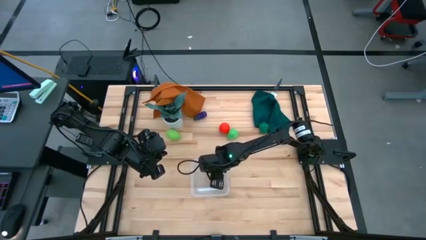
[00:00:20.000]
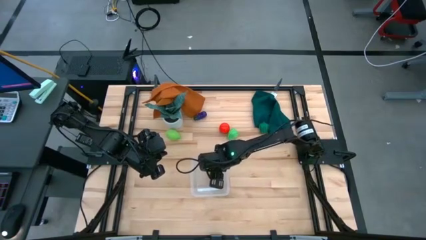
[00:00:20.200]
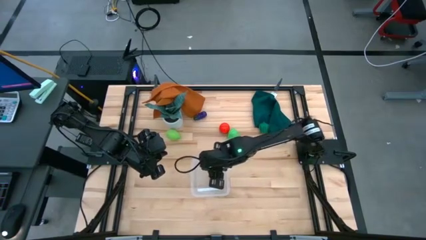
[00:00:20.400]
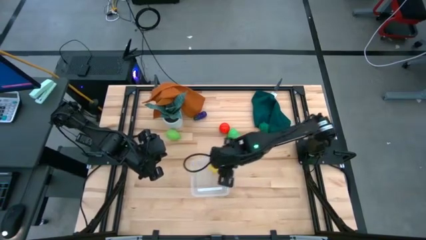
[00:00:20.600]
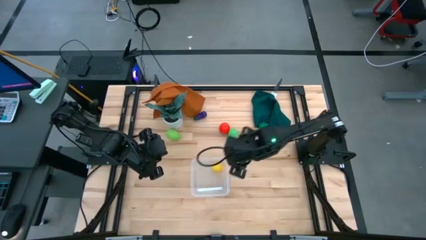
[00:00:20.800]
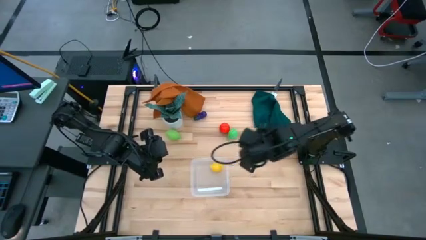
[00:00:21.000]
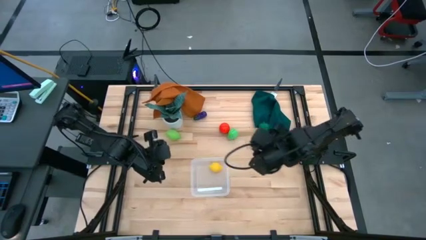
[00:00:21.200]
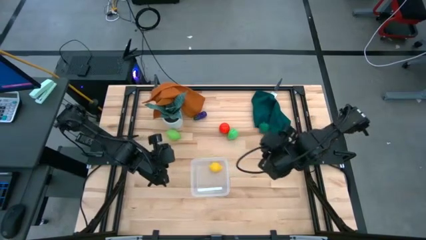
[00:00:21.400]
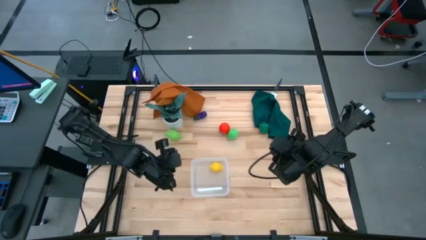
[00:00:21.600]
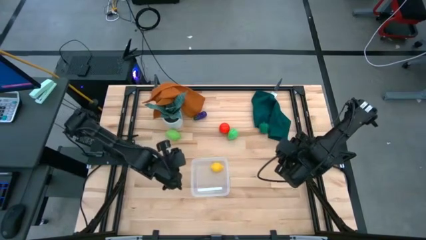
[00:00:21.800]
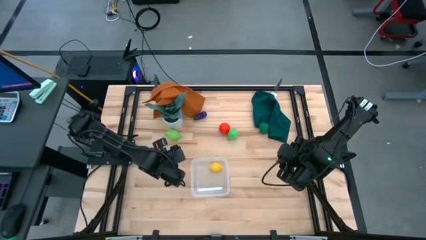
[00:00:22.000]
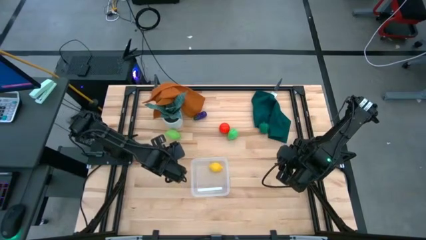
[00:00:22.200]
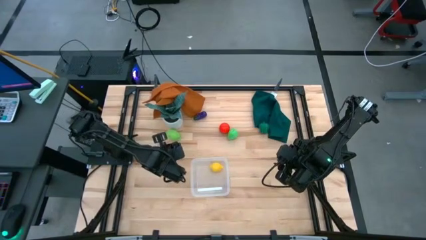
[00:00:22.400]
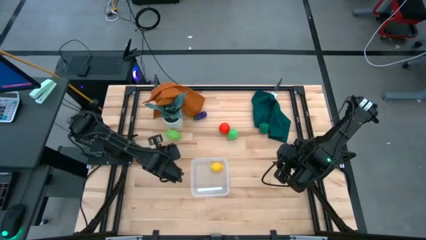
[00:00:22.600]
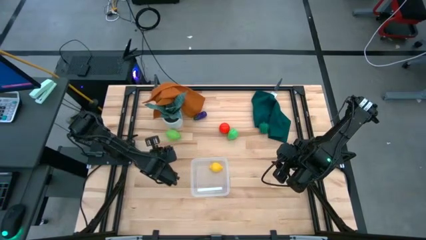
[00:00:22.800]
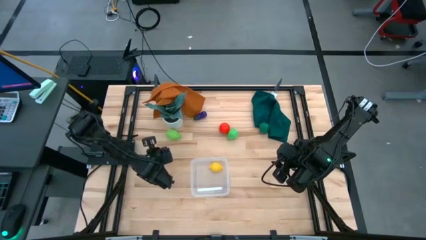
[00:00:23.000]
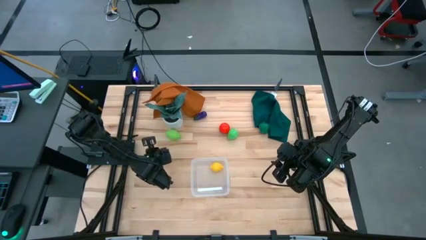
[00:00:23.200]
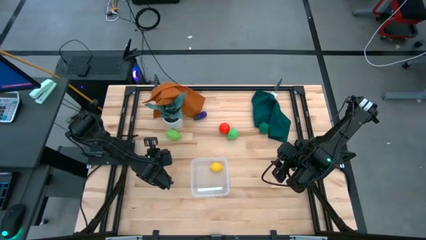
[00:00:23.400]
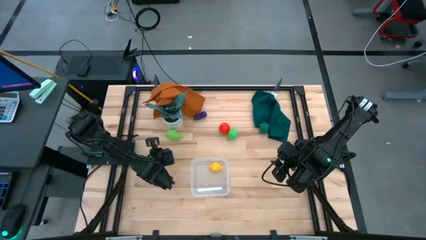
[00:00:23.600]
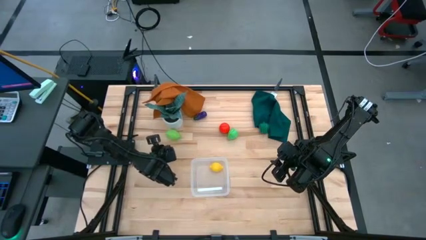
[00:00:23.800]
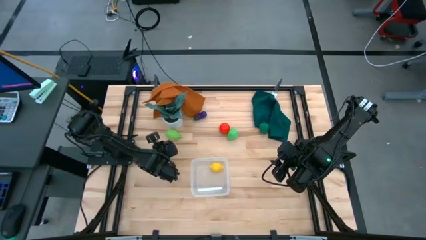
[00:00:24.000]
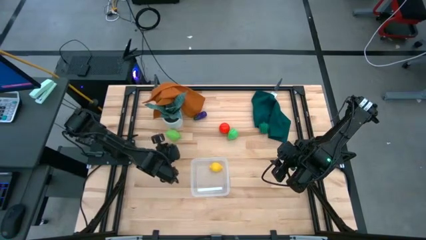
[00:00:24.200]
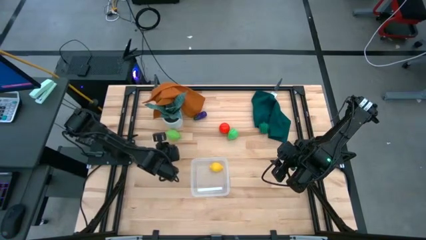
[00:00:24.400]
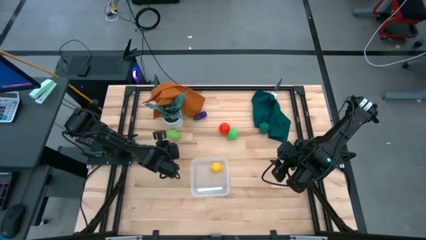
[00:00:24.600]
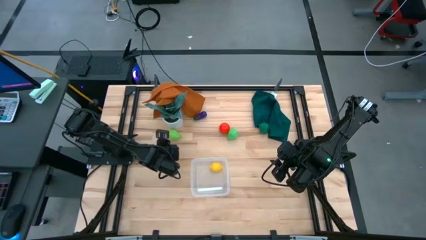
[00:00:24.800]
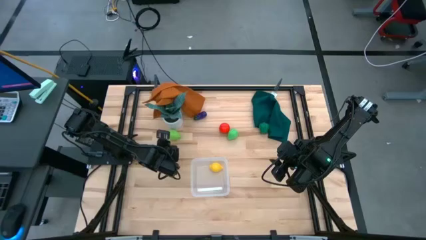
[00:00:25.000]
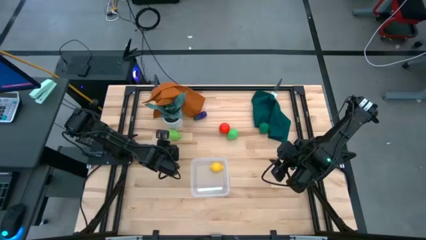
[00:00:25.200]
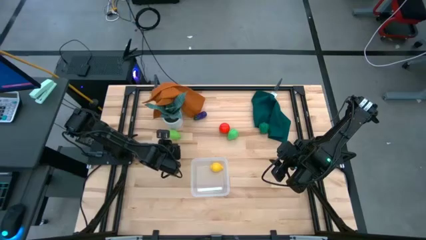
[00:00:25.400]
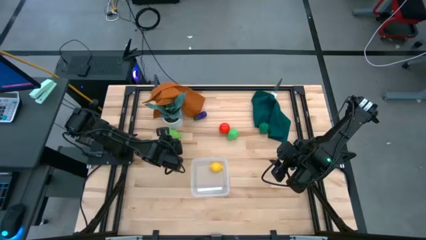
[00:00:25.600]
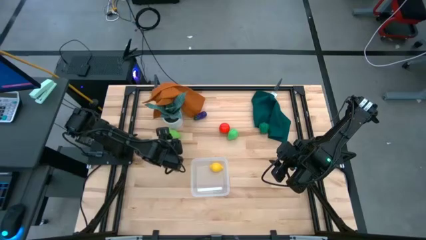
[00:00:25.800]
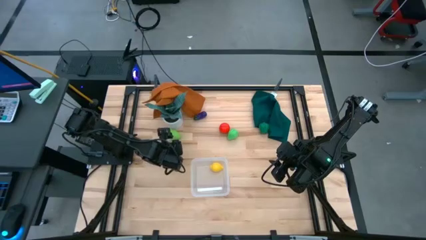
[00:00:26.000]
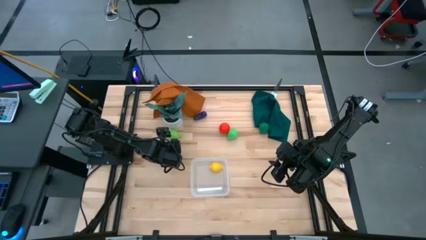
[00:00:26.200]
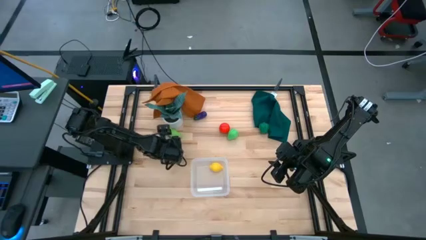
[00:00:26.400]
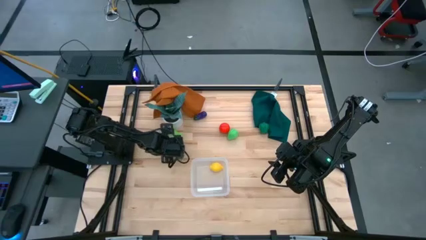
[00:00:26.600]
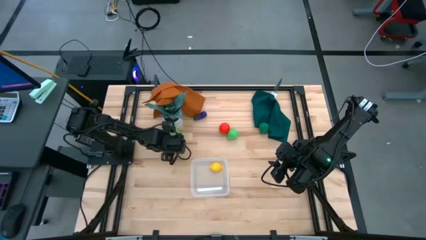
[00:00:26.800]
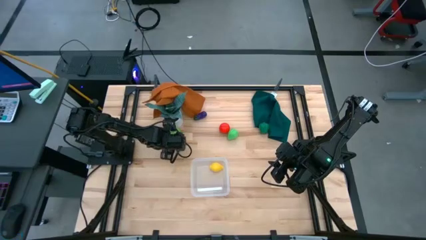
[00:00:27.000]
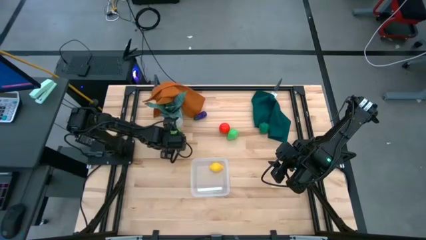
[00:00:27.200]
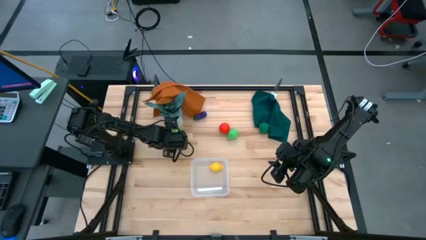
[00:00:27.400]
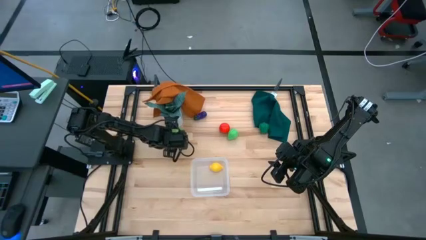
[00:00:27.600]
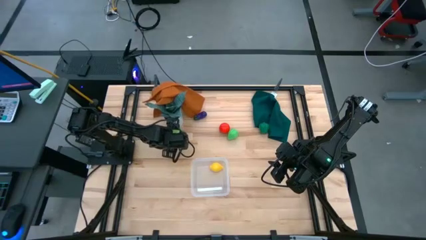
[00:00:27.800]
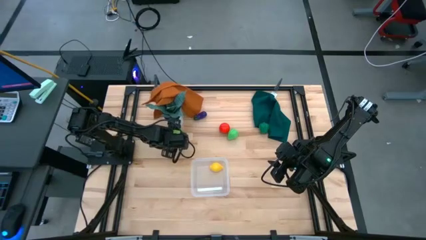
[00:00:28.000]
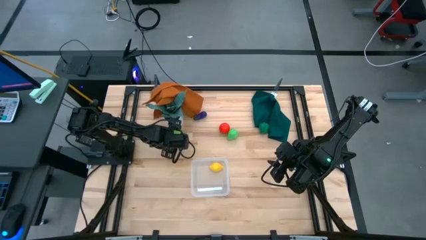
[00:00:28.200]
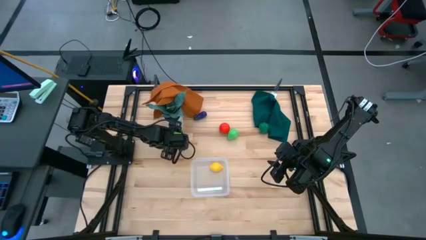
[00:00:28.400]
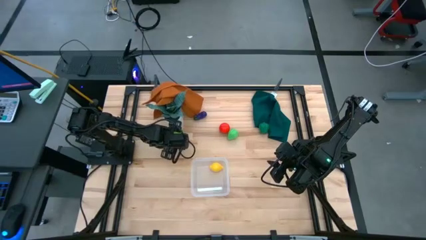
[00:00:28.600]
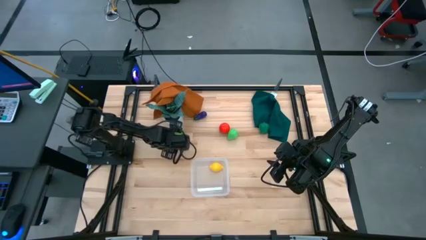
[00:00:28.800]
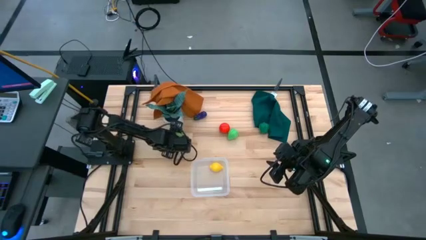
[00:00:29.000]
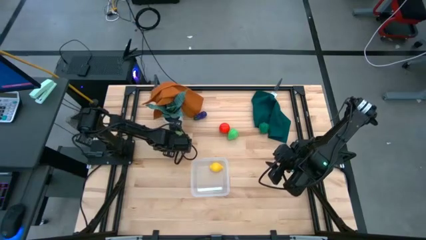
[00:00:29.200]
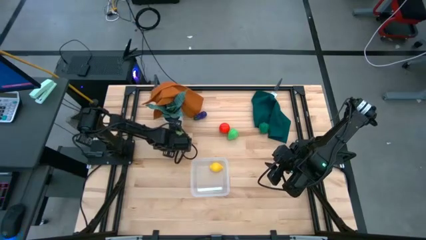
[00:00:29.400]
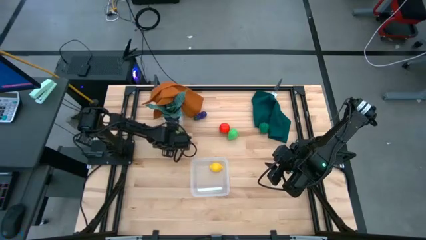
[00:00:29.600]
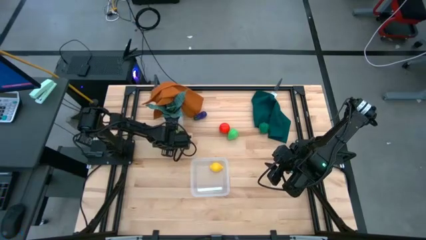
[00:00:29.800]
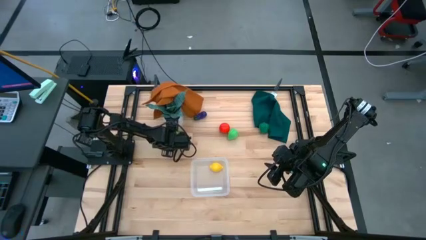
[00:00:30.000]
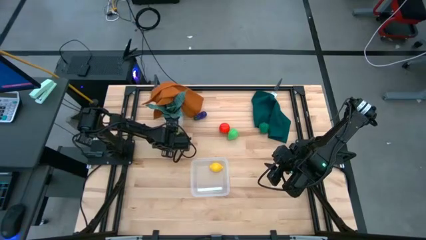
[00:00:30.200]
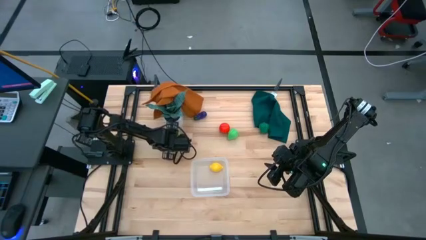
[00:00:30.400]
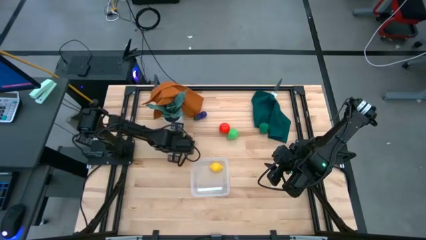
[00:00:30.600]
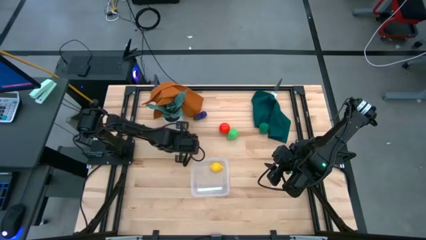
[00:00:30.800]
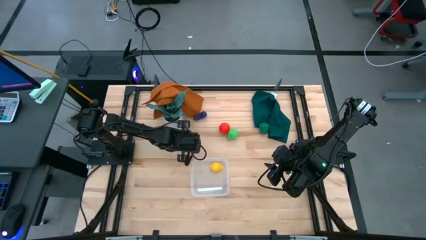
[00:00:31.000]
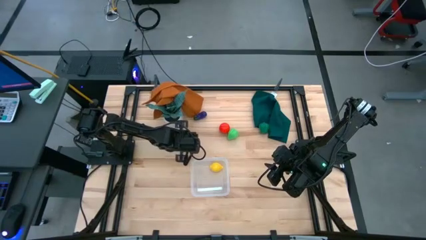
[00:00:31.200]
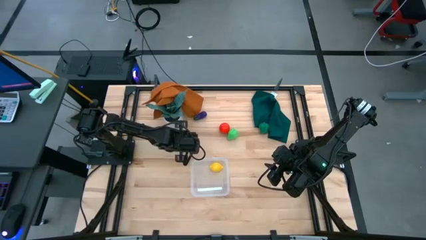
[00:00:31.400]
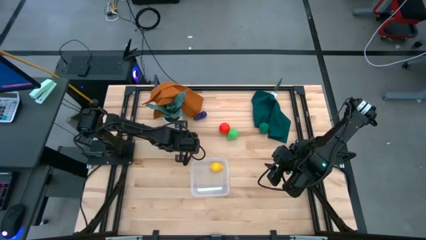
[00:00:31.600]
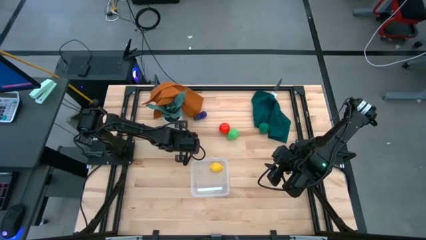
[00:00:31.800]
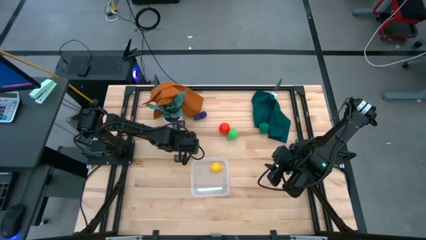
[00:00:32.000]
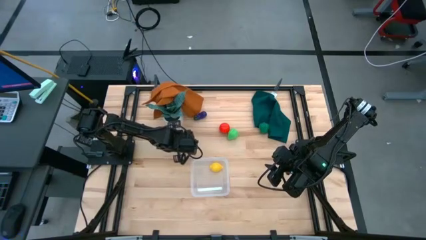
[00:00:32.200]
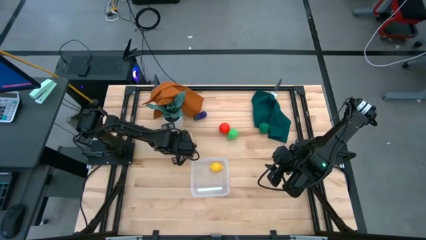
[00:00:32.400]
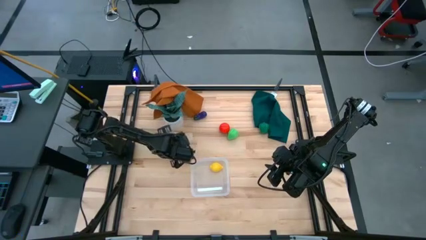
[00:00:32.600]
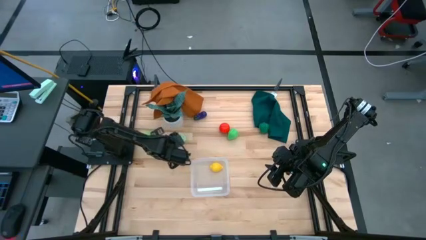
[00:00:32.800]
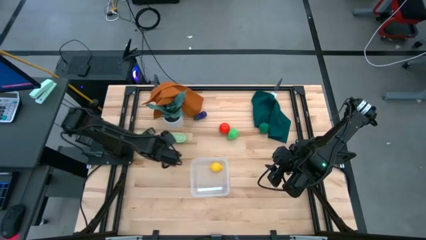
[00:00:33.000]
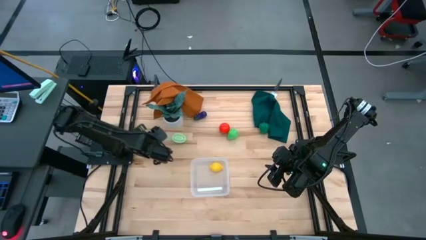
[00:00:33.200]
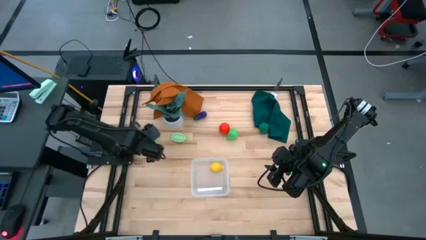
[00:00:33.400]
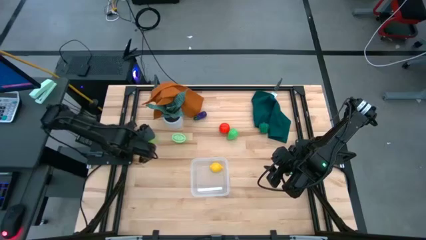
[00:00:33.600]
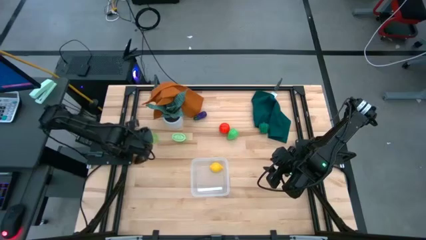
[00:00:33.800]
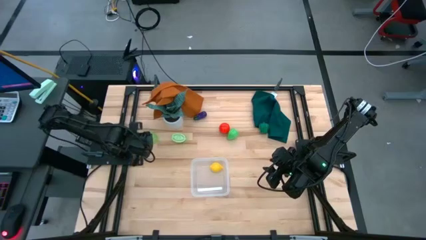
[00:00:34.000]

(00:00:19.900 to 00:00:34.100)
Task: Pick and placing Produce into tupperware
Put the melon into the transparent bin
